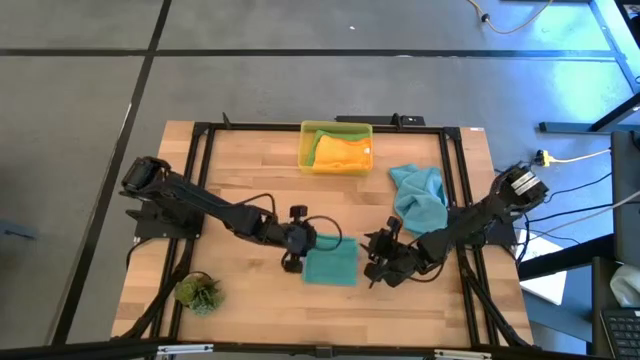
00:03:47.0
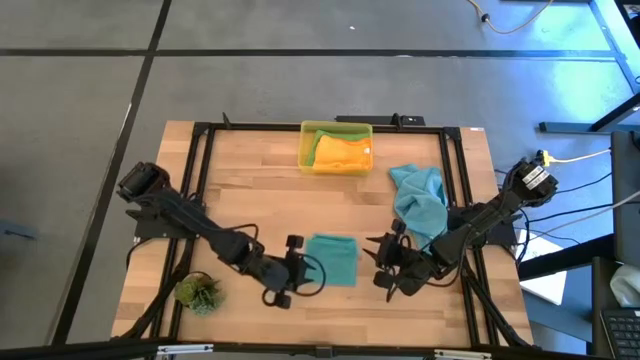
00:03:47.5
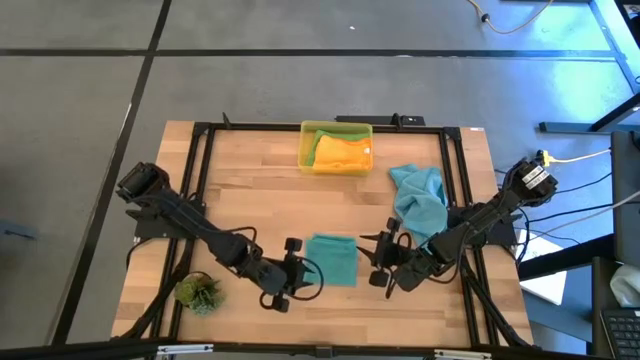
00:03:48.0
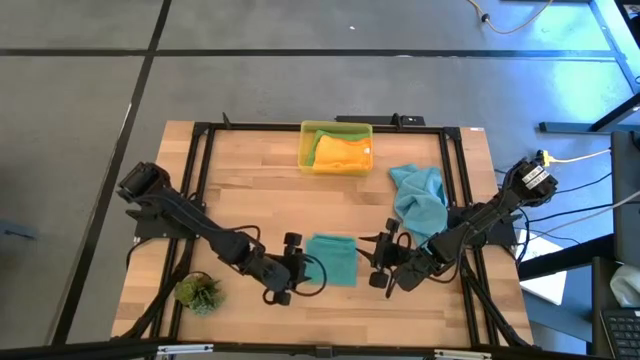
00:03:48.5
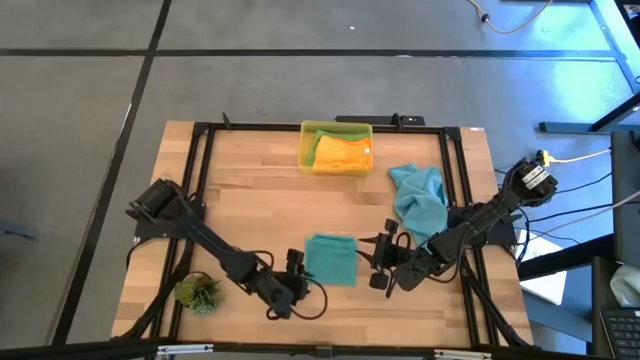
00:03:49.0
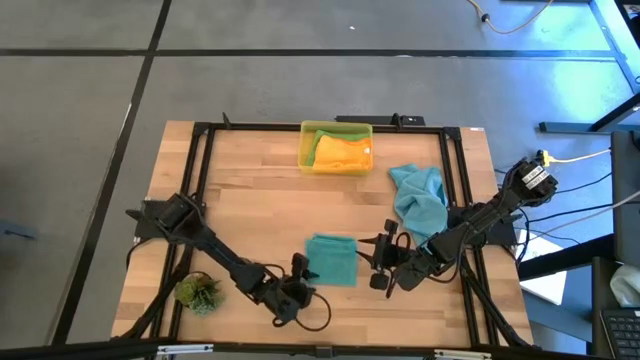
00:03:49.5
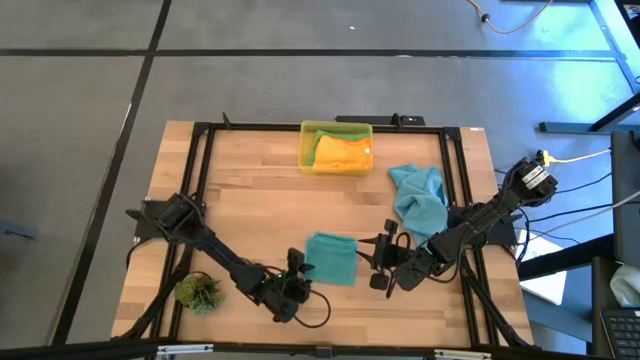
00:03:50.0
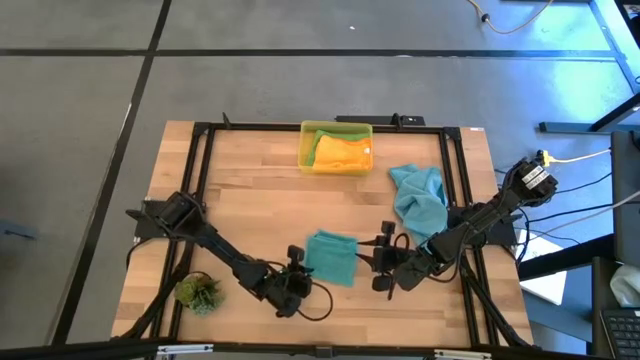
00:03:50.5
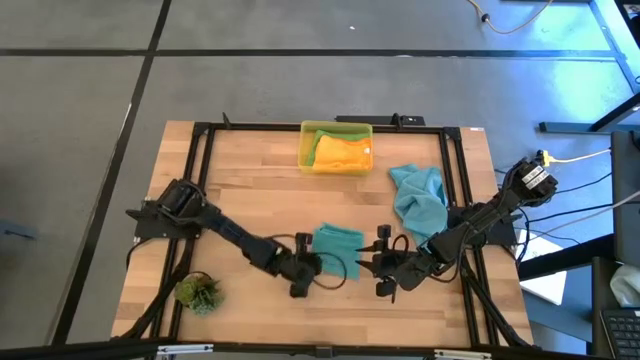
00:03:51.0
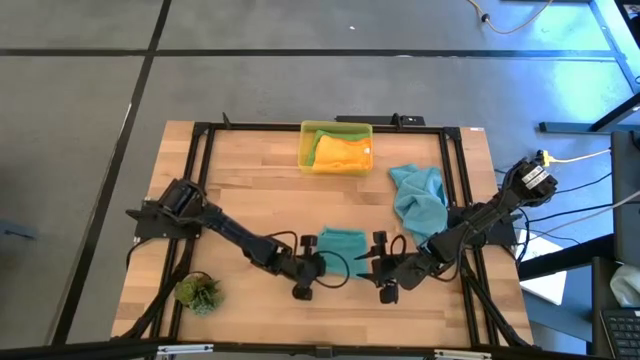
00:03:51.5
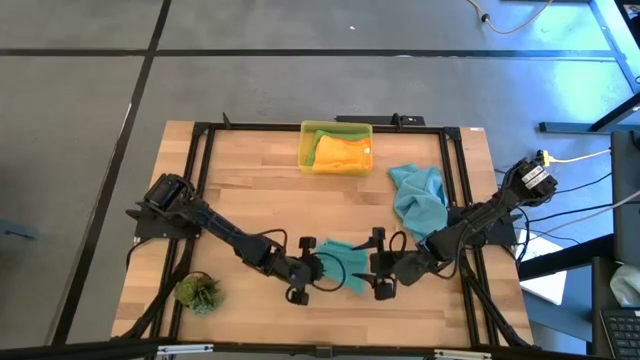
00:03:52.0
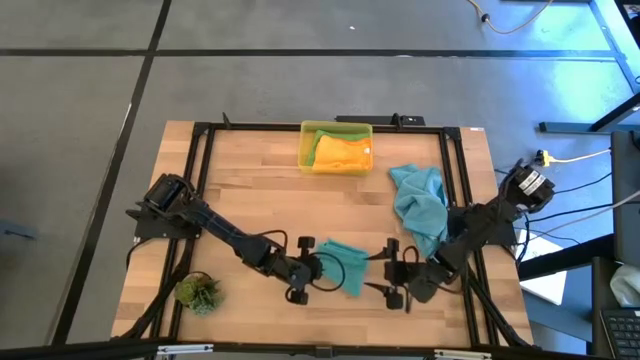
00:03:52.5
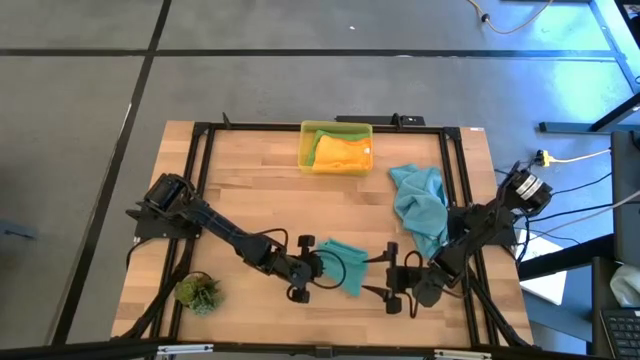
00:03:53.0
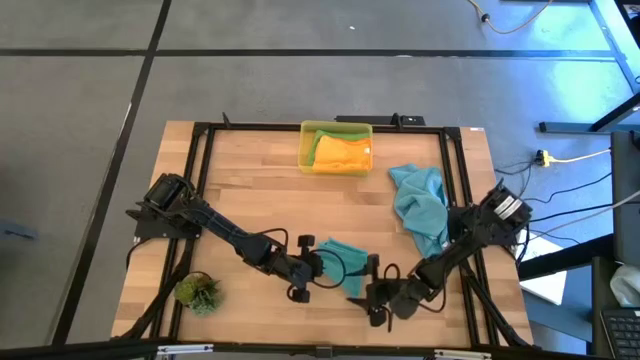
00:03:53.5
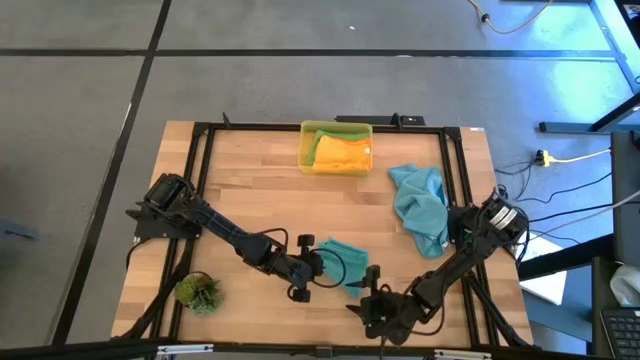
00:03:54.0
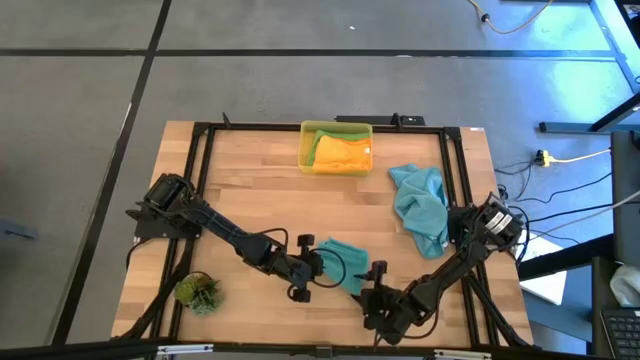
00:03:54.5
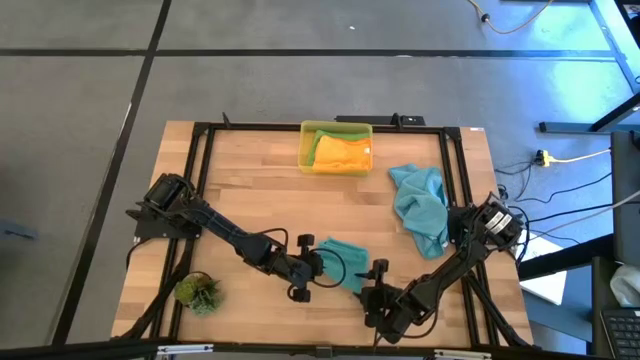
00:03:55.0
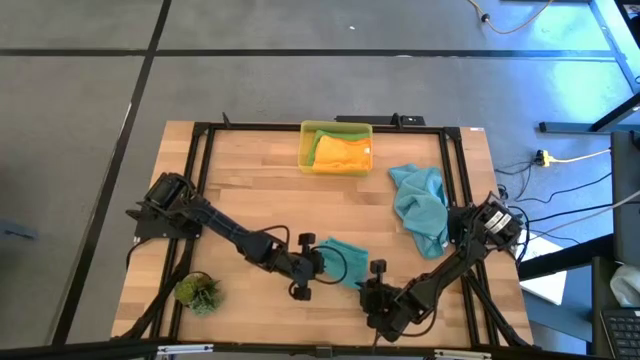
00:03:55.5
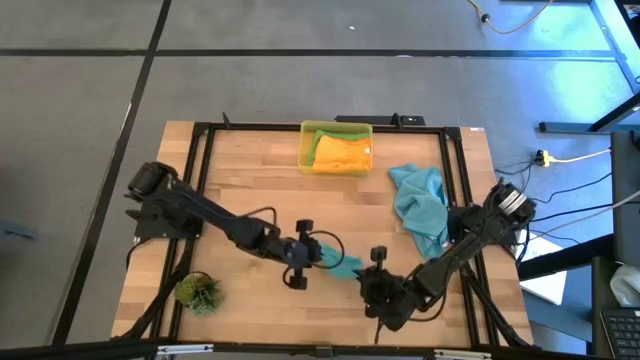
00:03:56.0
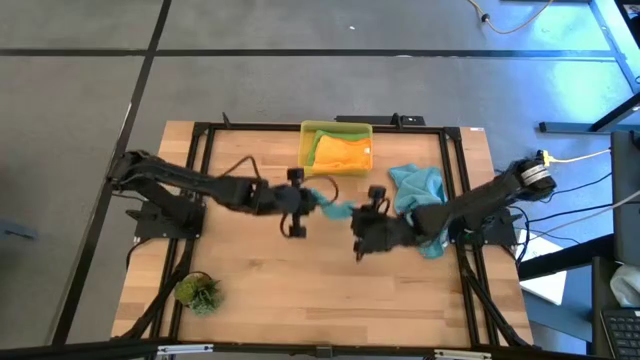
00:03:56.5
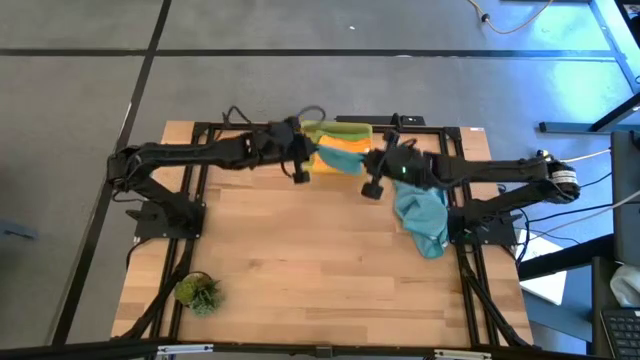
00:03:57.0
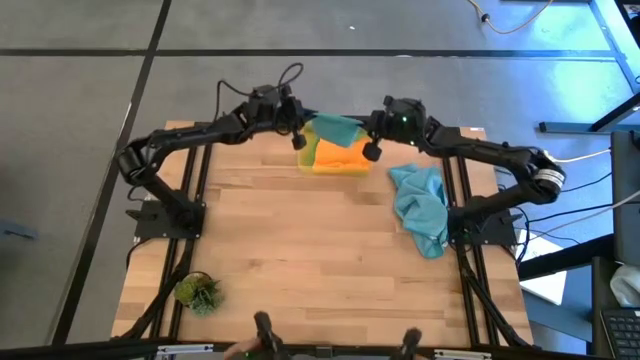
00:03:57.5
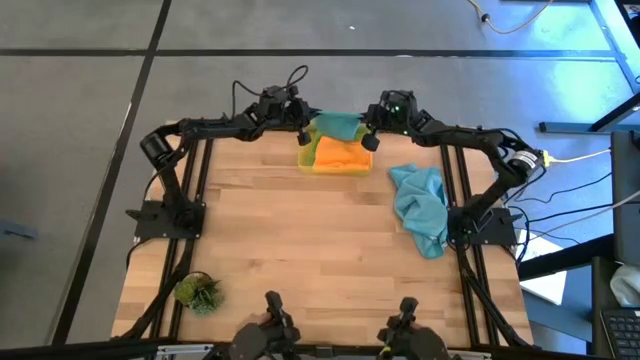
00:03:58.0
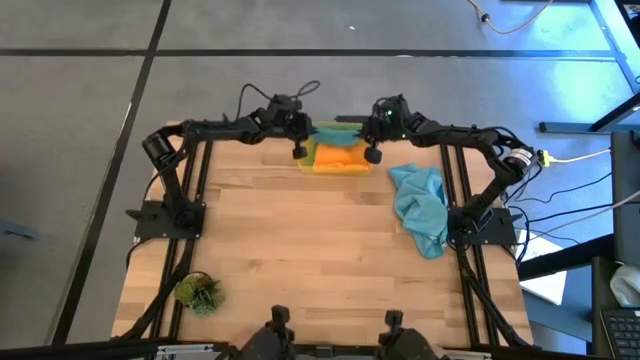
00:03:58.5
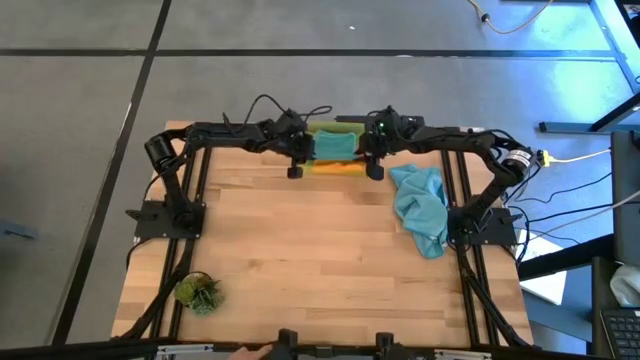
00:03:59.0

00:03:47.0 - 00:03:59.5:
Task: Fold microfiber towels
Put the left blue microfiber cloth into the yellow bin

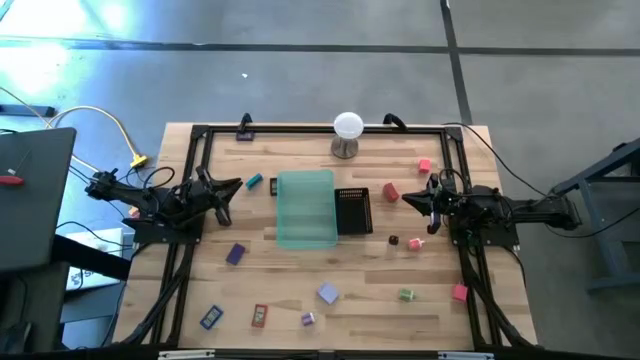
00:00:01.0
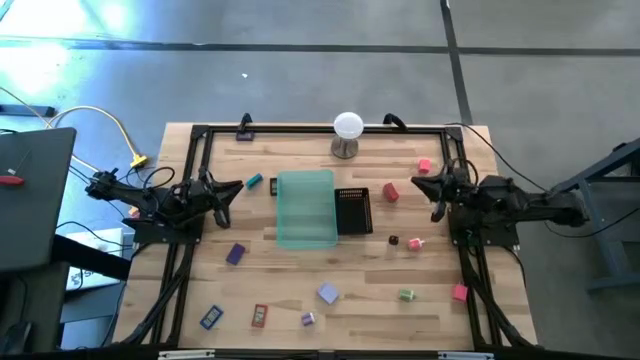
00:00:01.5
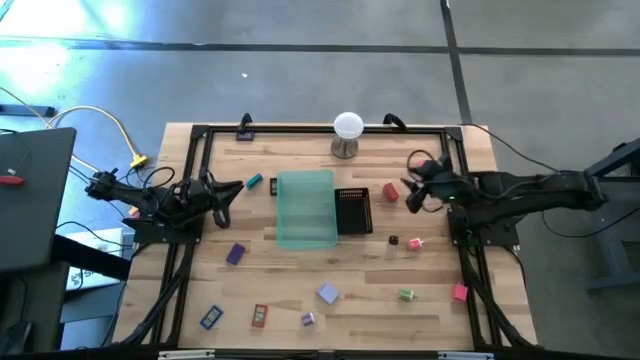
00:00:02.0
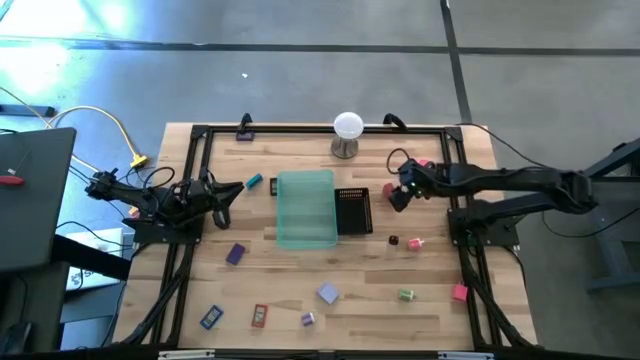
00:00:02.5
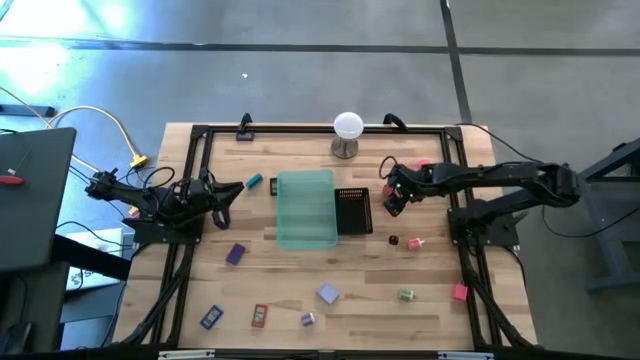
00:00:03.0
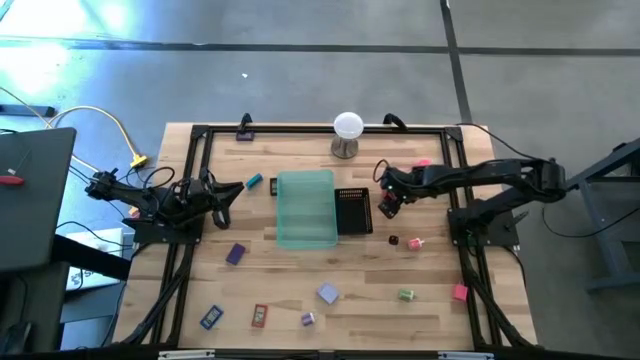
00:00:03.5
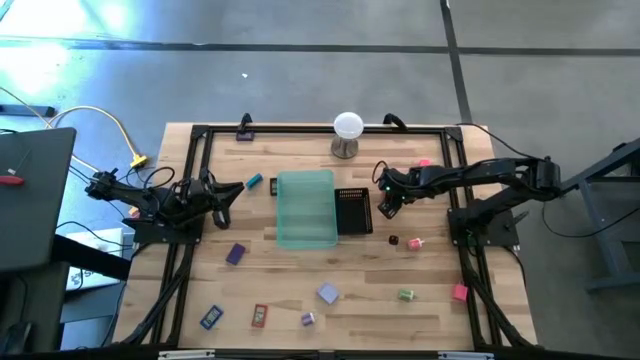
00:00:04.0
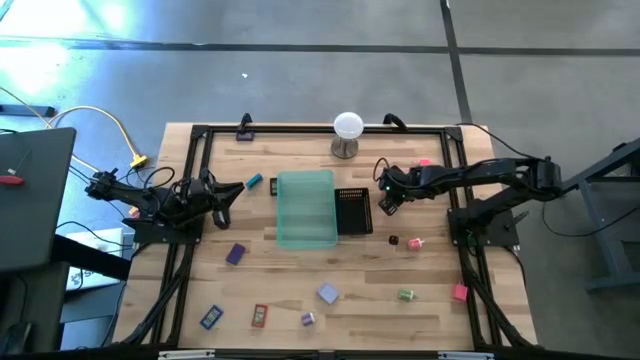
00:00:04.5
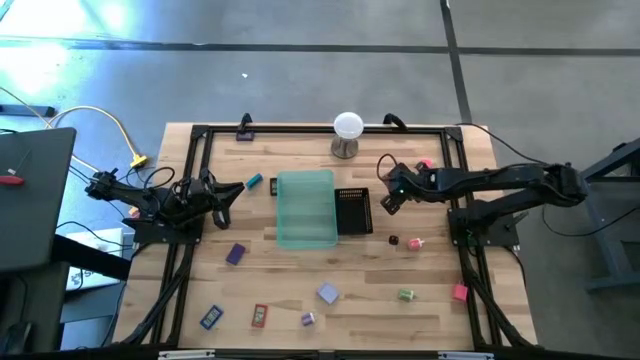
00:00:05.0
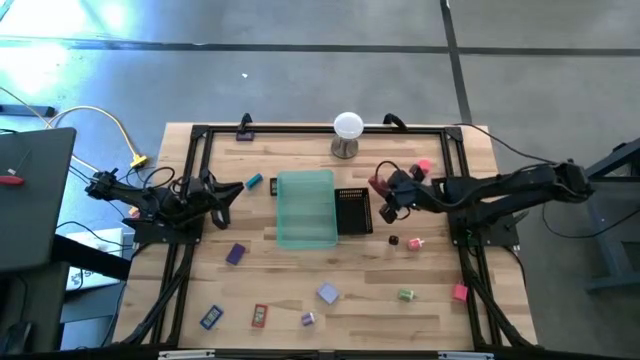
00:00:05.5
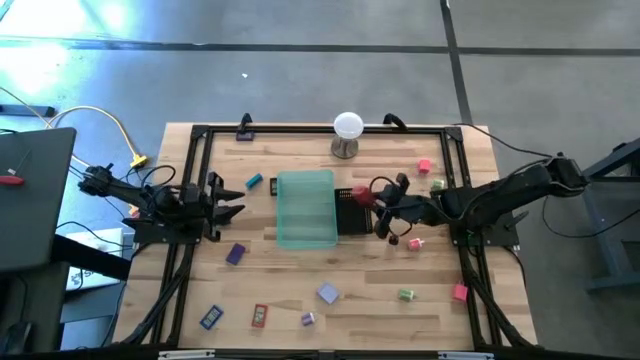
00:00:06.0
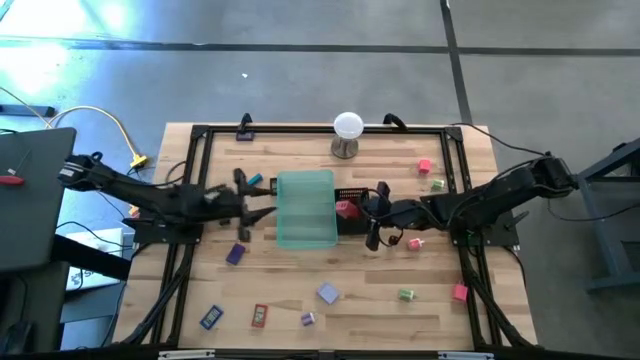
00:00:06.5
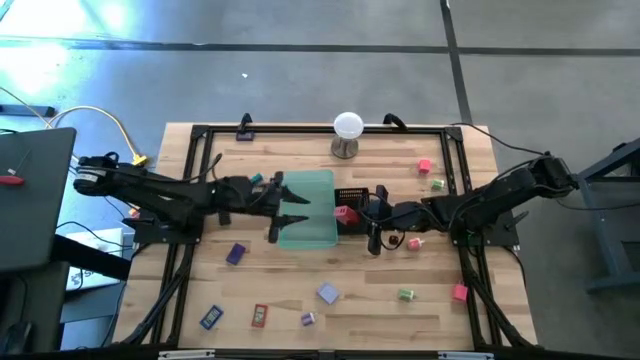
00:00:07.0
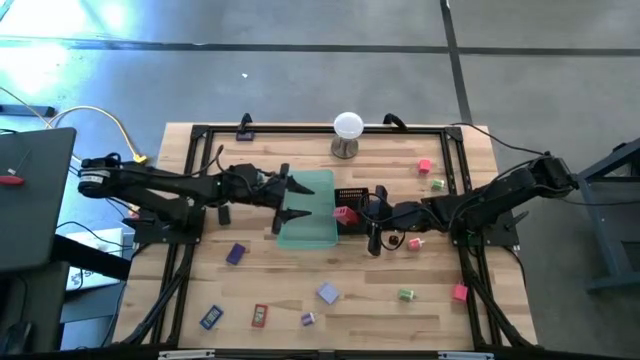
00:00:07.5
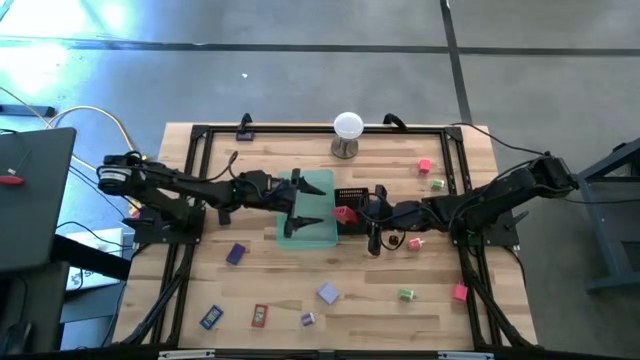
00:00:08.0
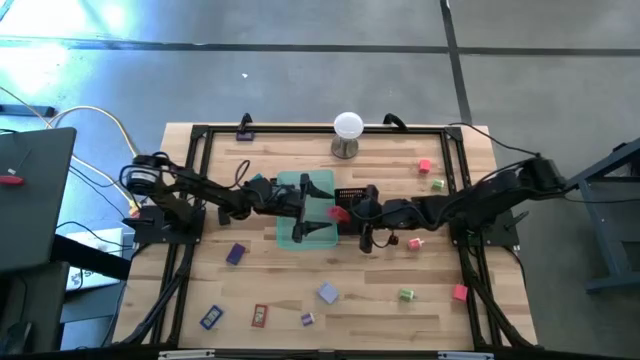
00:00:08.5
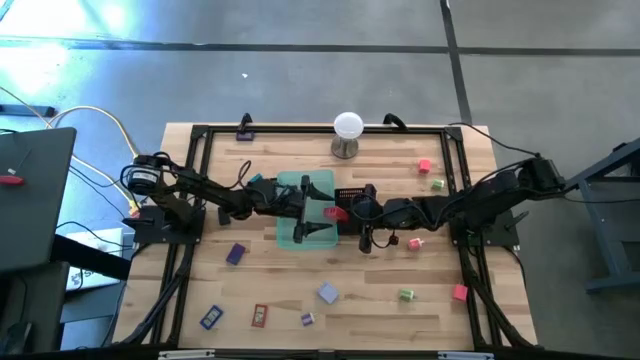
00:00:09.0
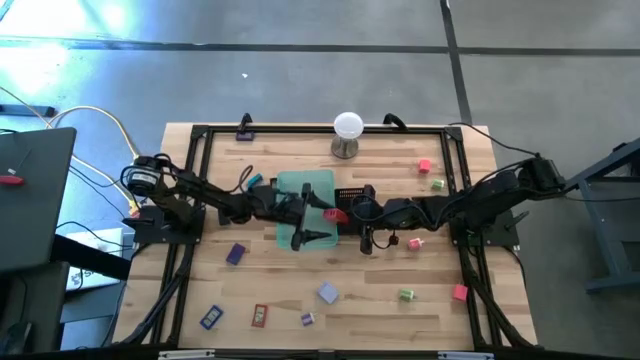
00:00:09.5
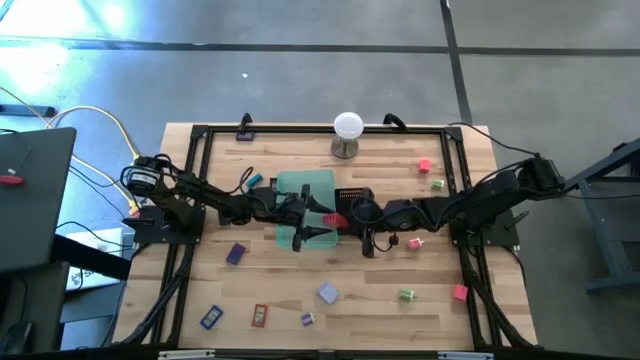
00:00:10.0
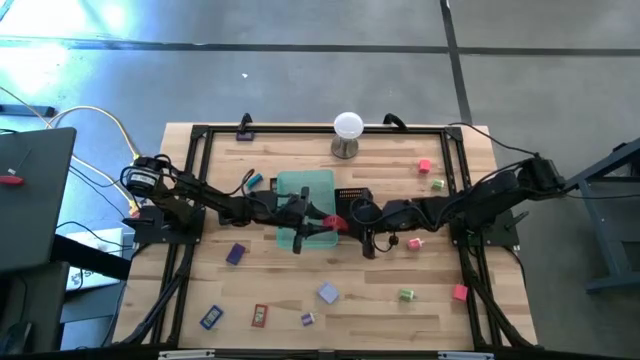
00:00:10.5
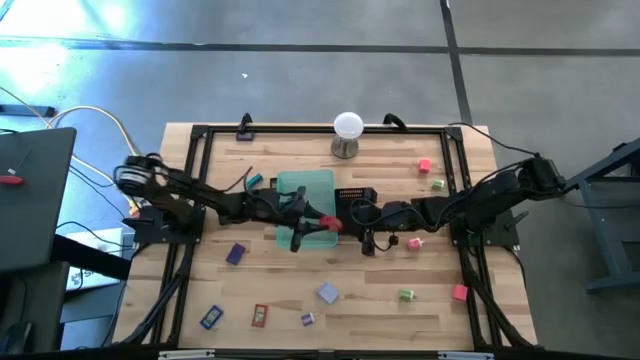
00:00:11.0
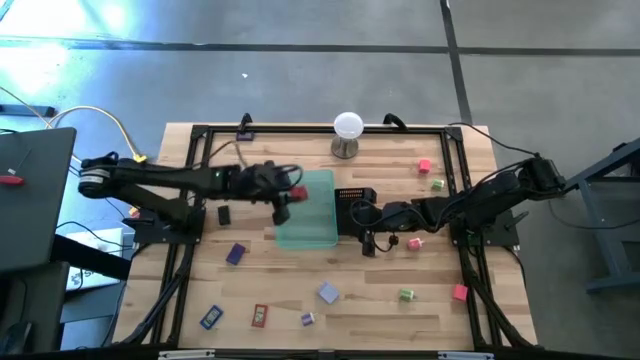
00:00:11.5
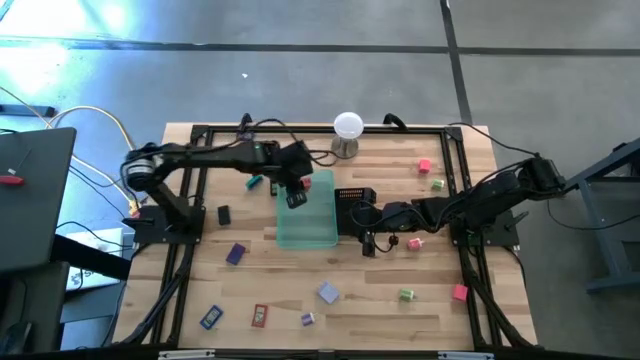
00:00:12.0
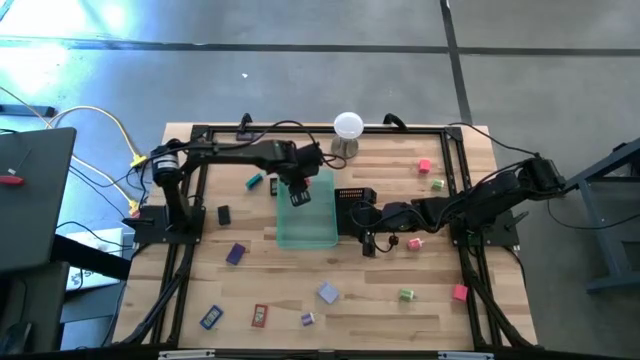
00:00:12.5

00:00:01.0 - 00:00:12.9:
Task: Pick & Place Office items
Put the red charger adapter into the blue bin
